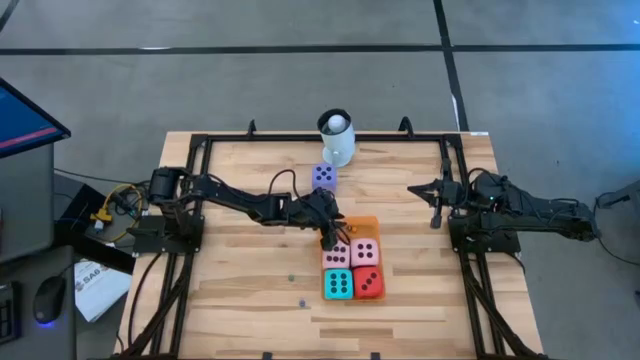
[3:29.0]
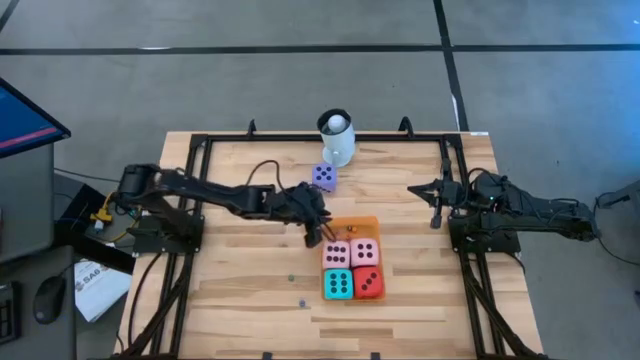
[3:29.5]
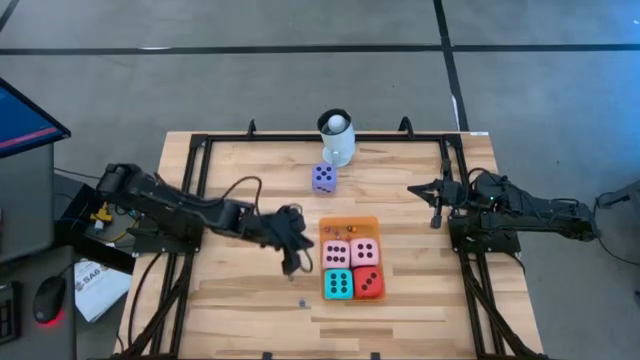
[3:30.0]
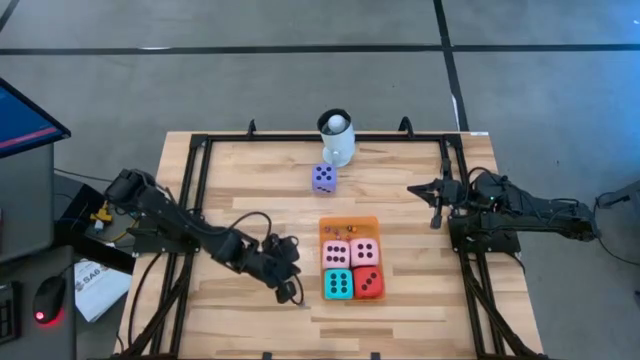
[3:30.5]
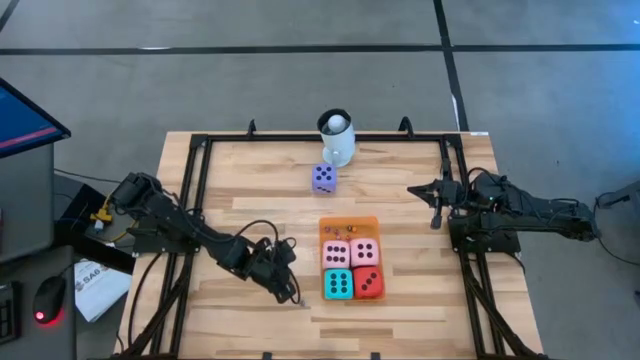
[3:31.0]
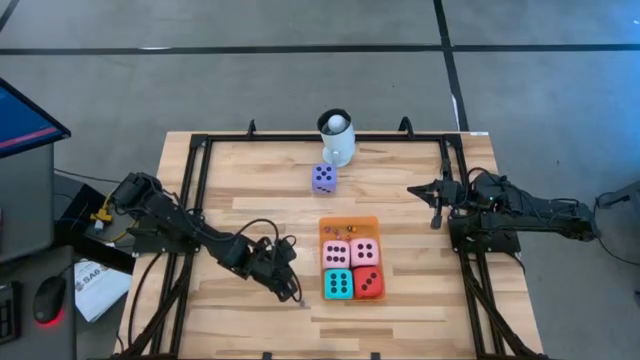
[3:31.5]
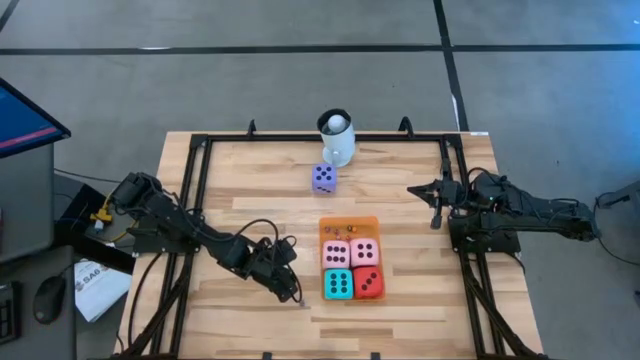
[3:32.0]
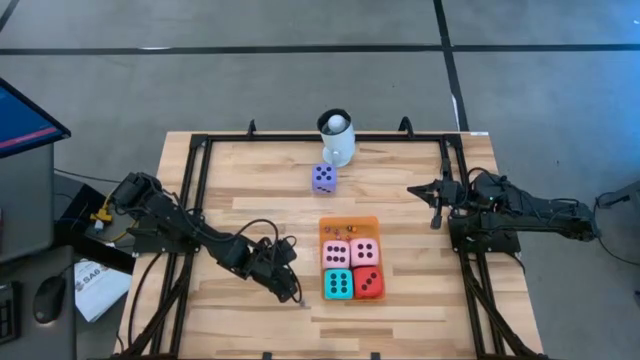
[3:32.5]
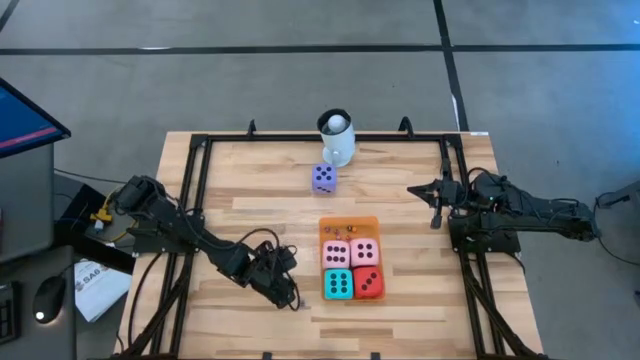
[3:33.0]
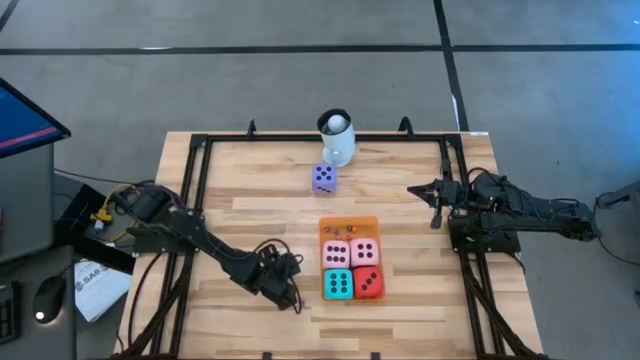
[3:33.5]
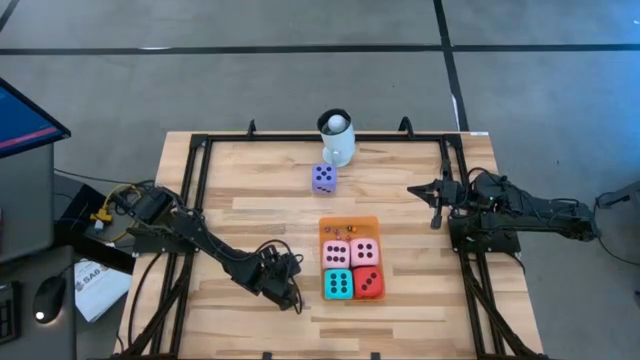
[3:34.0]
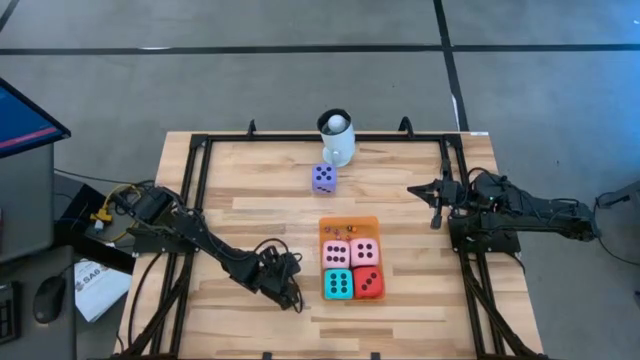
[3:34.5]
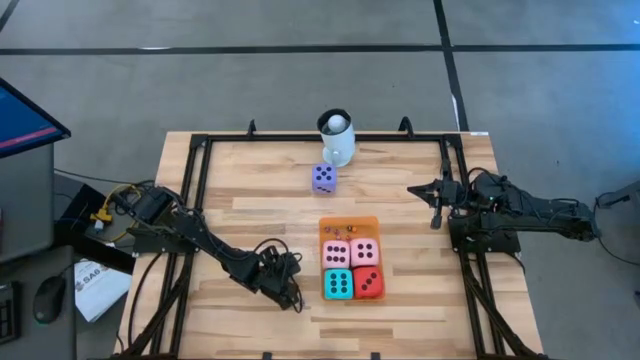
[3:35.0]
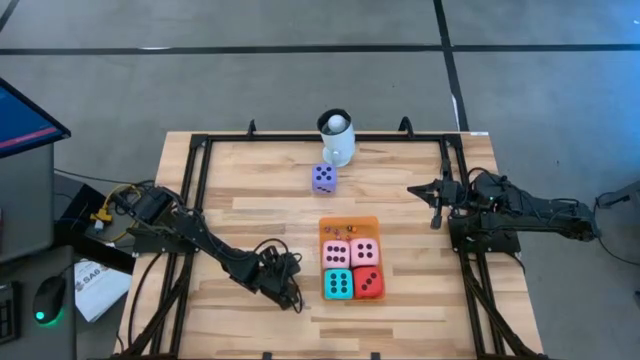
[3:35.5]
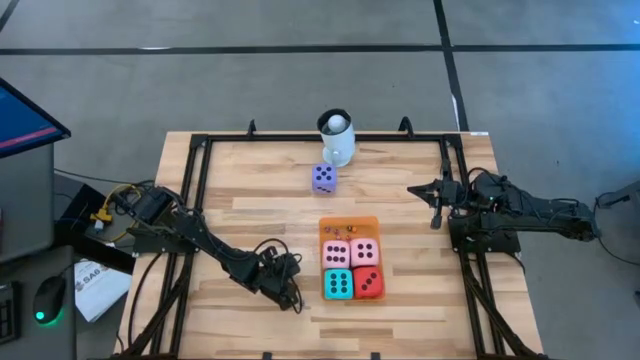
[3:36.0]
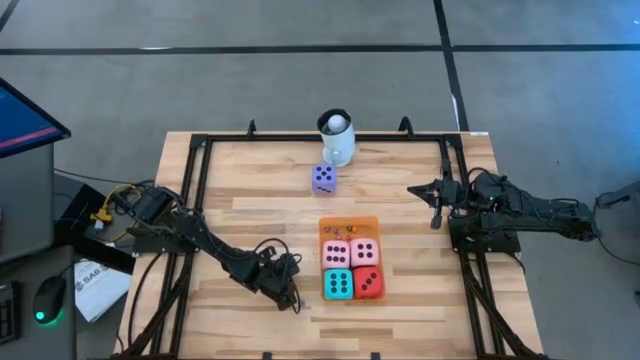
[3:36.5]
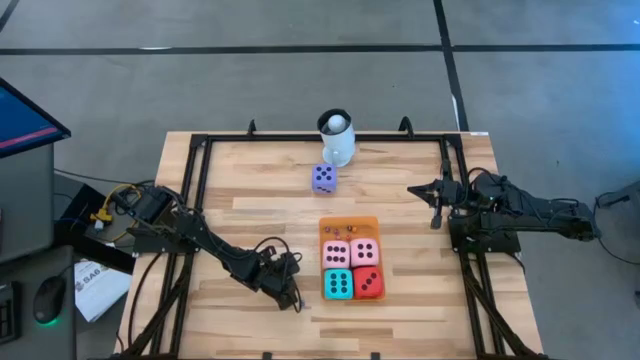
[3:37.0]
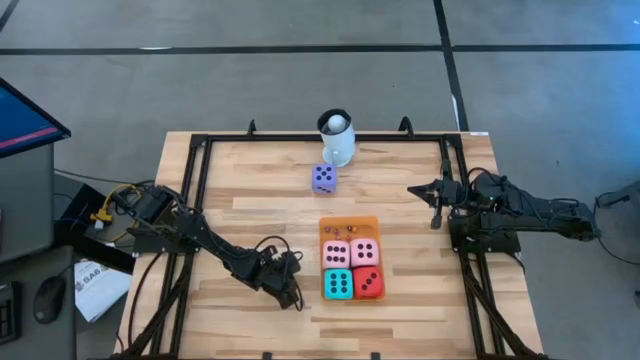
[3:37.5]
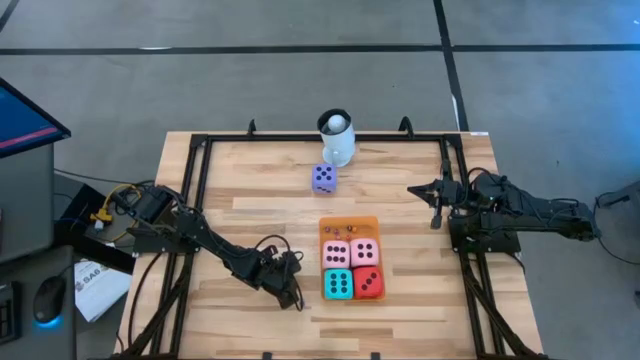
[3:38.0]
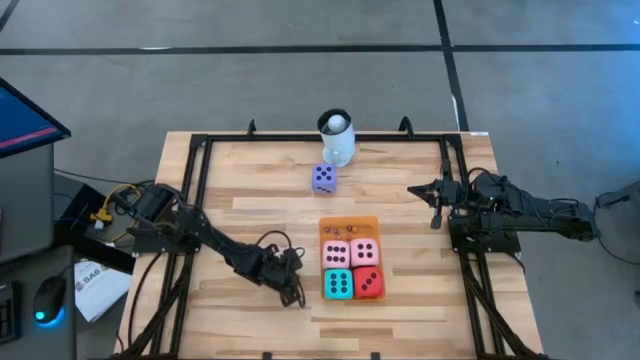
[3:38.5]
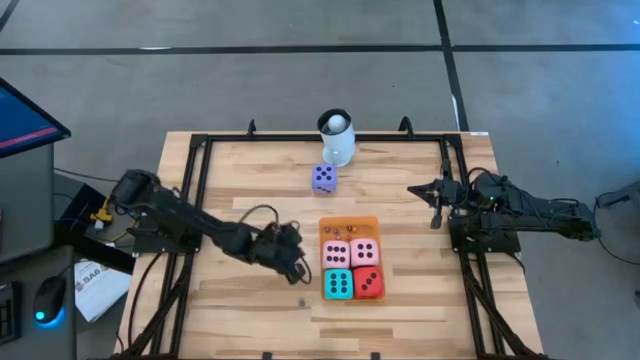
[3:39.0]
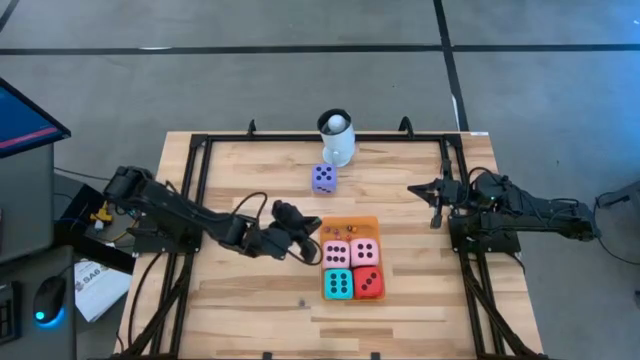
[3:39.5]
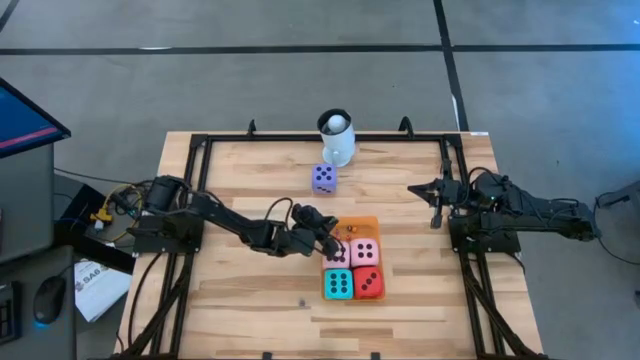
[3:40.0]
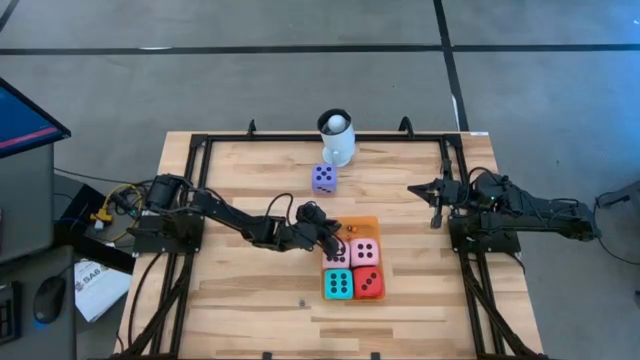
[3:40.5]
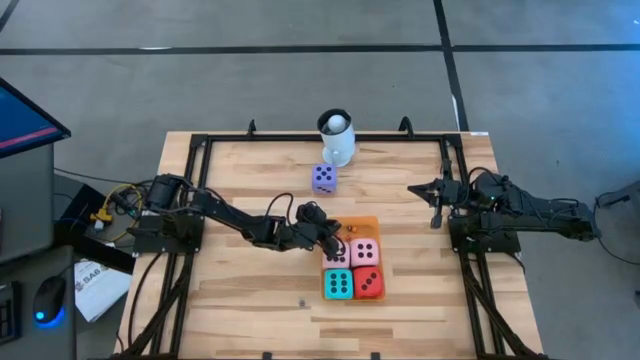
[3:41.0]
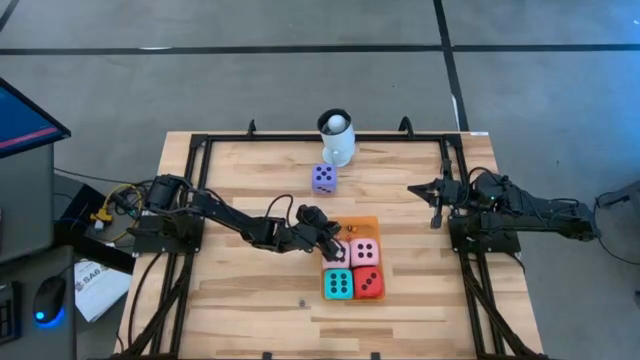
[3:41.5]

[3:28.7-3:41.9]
Task: Pick & Place Dice
Put the small green dice into the orange bin

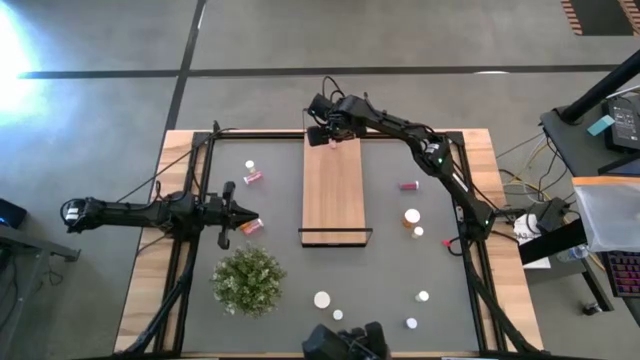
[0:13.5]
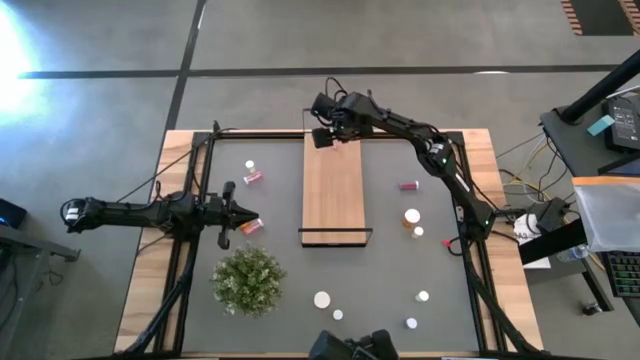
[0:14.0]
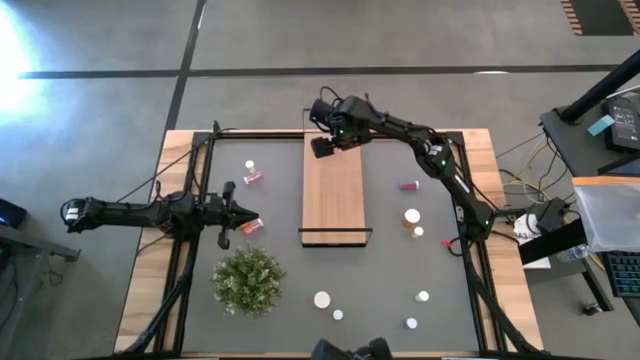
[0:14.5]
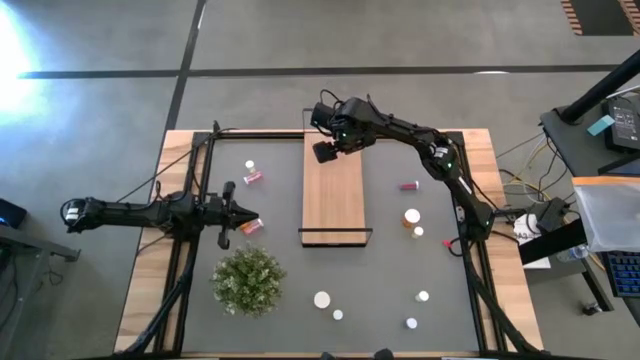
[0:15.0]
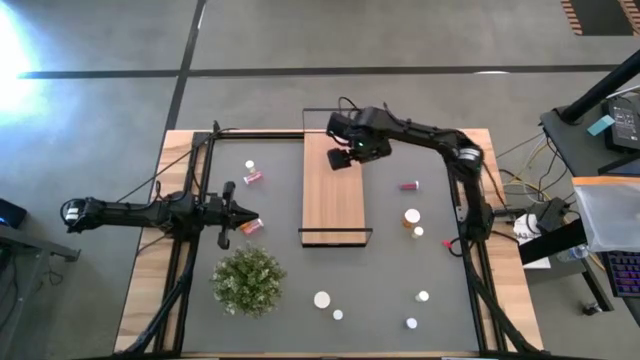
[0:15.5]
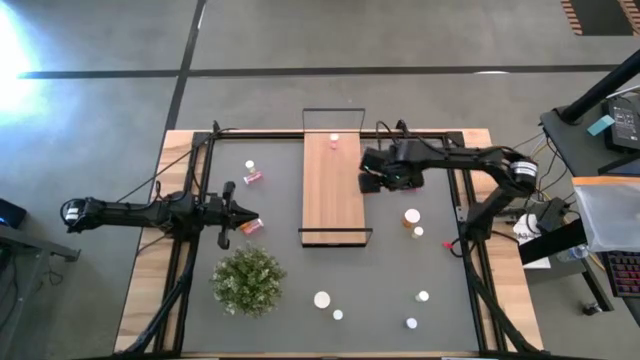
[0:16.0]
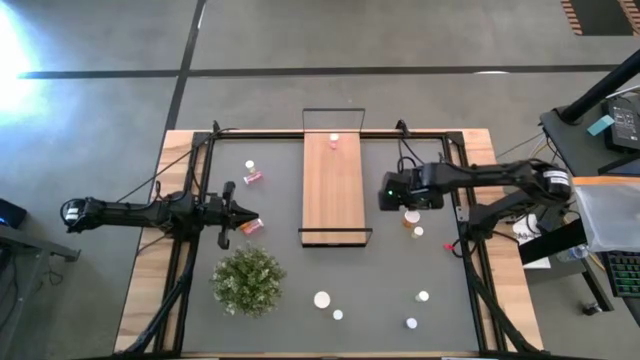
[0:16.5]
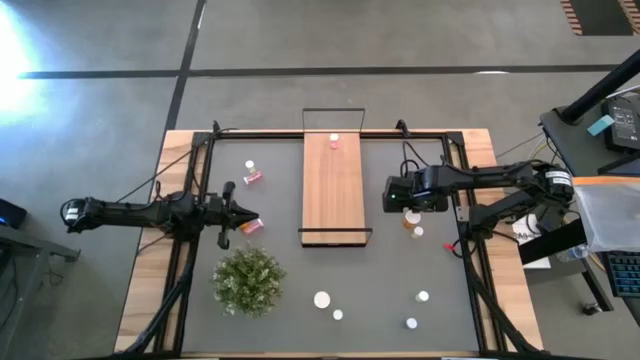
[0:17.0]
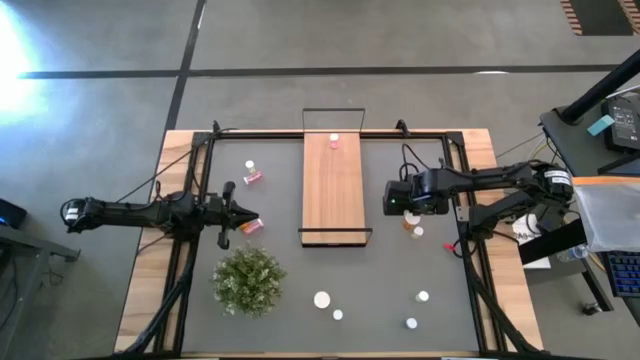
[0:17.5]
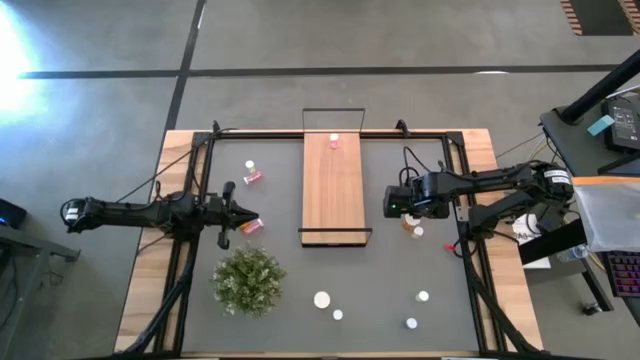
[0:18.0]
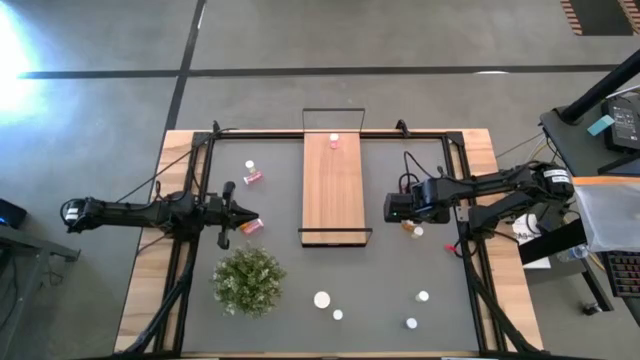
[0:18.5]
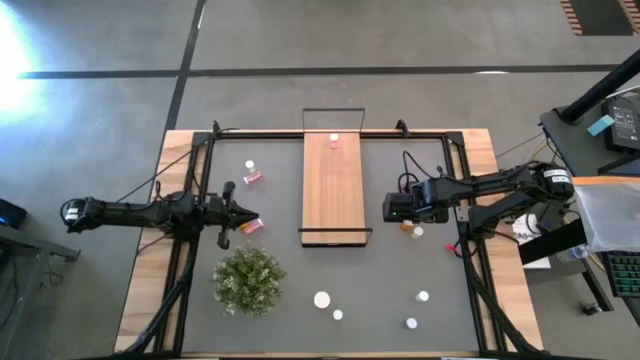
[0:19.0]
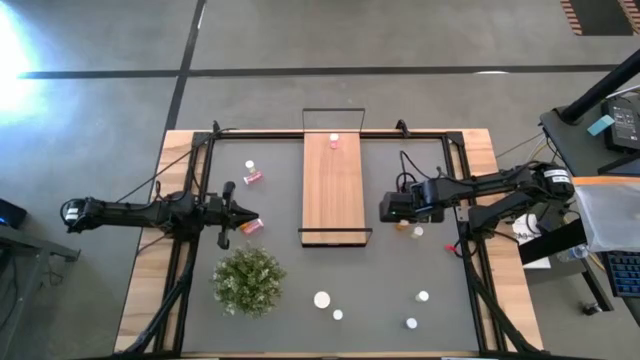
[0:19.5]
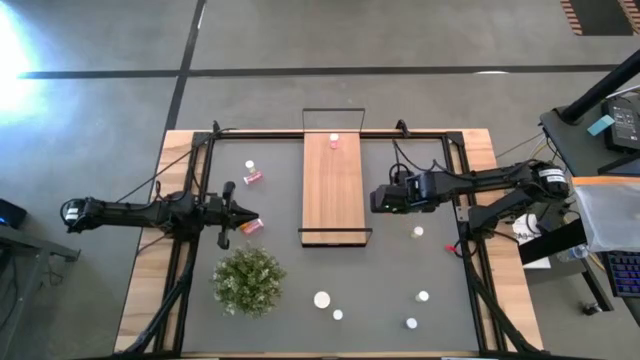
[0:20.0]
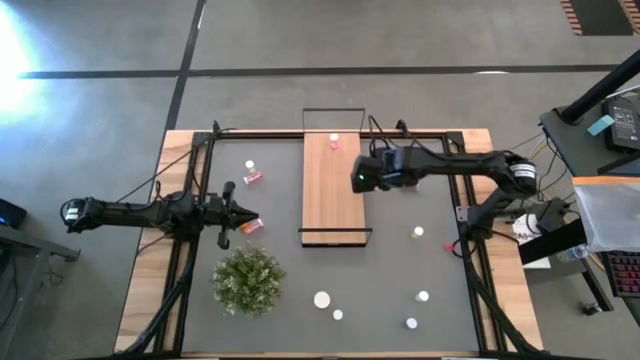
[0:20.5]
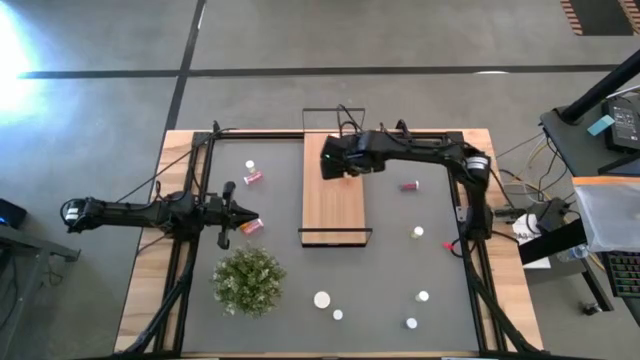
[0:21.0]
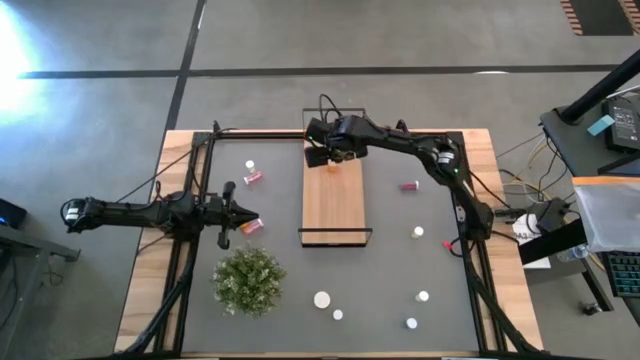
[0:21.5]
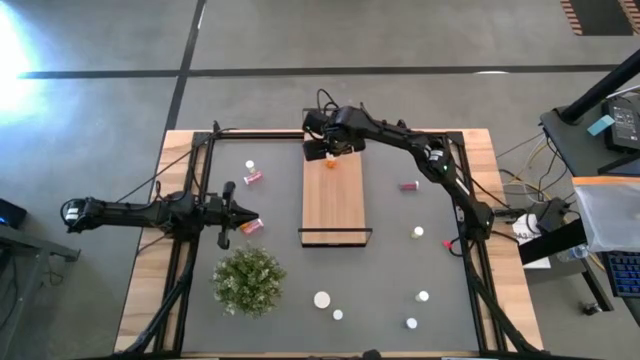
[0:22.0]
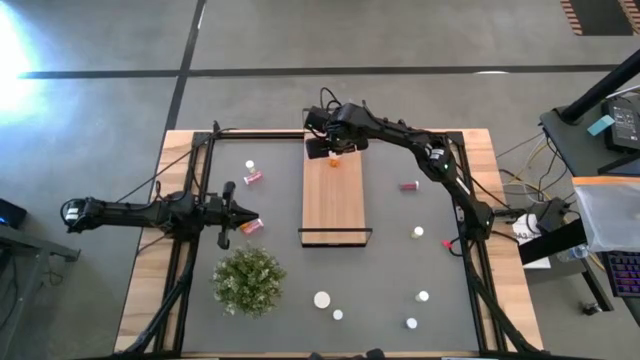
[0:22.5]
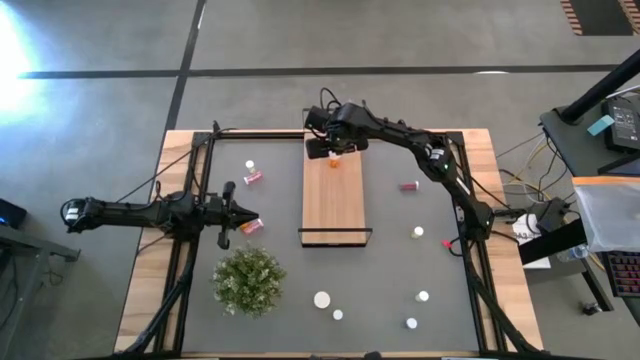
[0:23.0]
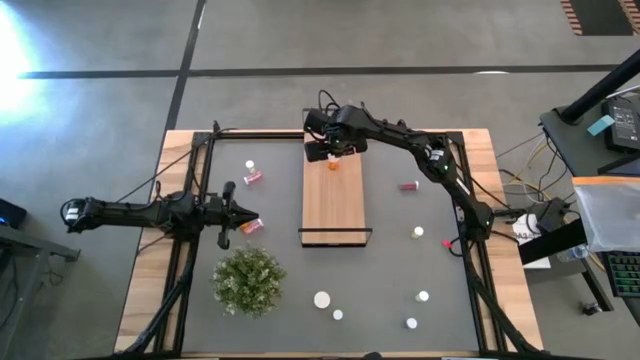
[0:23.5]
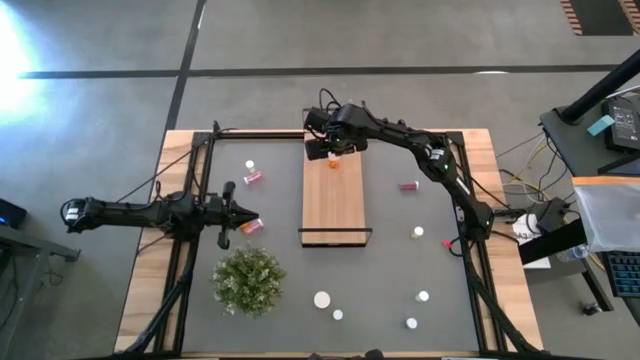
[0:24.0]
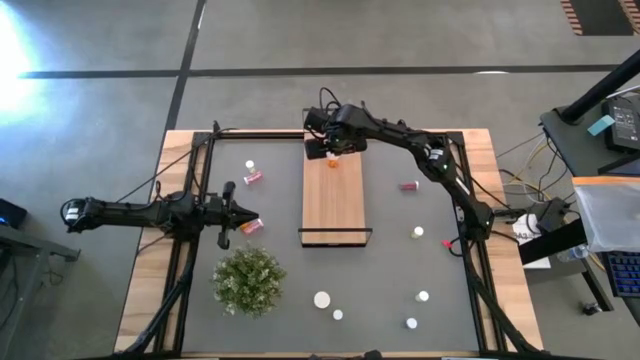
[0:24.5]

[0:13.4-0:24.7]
Task: Pick and place medicine bottles onto shelf by color
Put the top right orange pill bottle on the shelf
